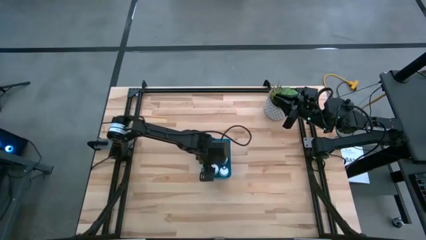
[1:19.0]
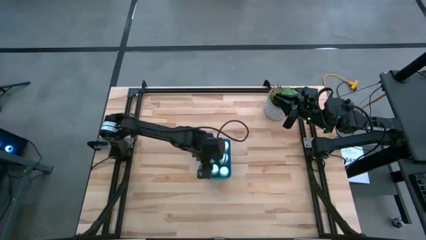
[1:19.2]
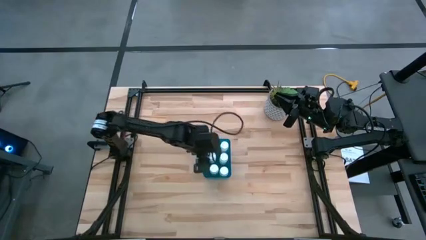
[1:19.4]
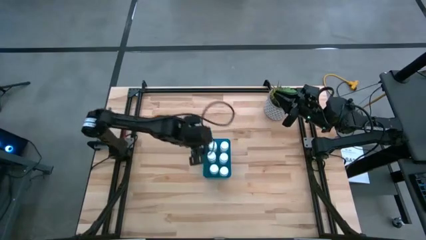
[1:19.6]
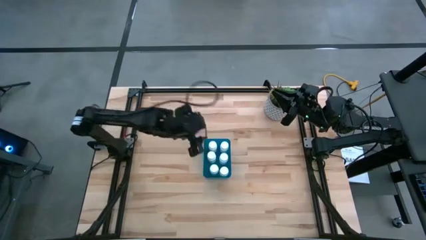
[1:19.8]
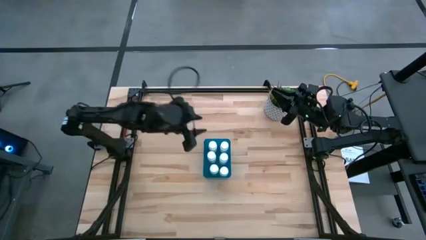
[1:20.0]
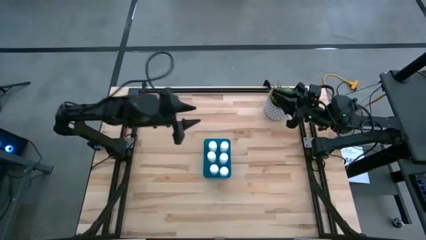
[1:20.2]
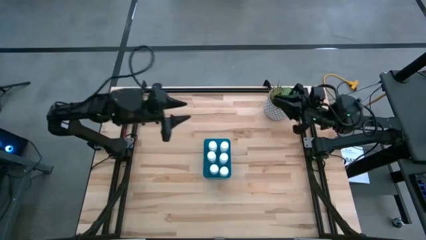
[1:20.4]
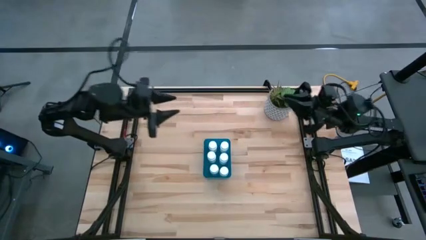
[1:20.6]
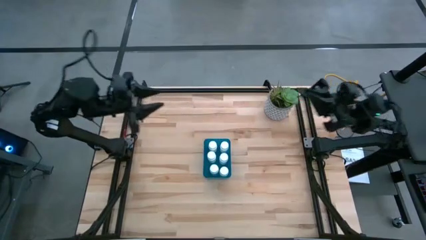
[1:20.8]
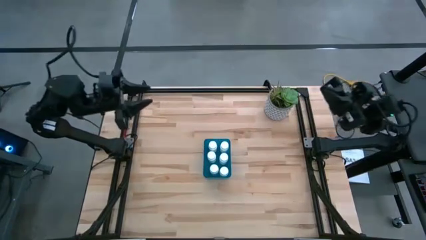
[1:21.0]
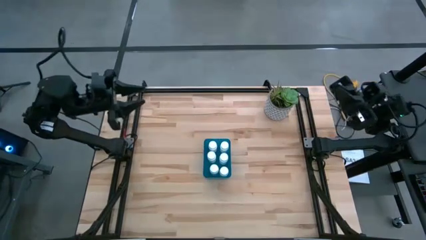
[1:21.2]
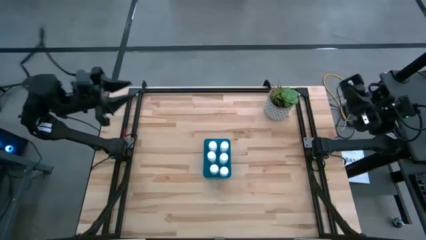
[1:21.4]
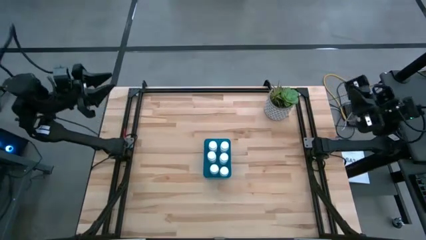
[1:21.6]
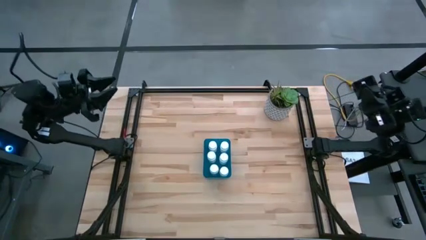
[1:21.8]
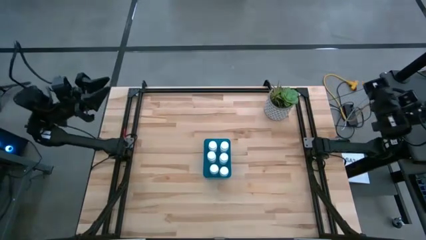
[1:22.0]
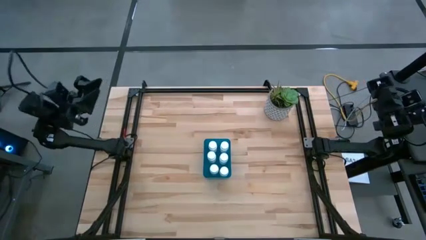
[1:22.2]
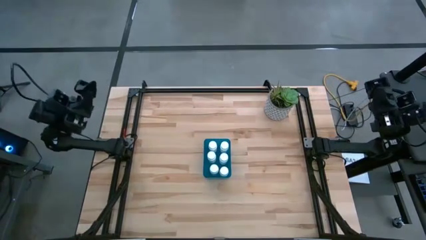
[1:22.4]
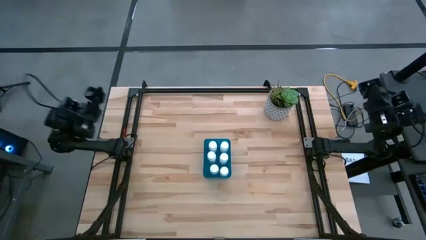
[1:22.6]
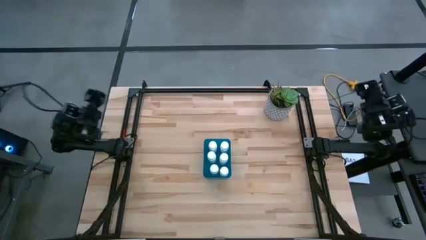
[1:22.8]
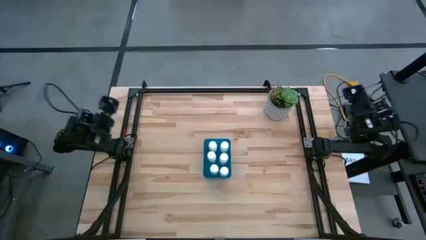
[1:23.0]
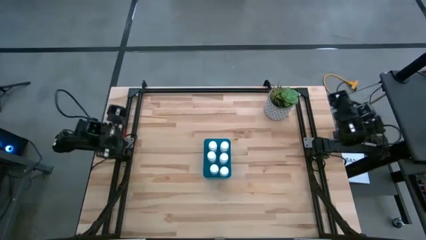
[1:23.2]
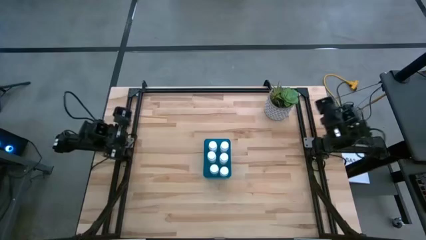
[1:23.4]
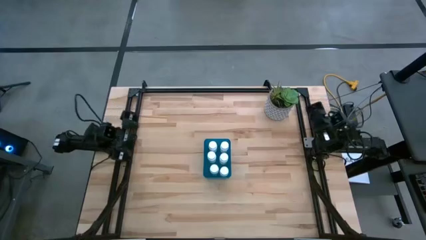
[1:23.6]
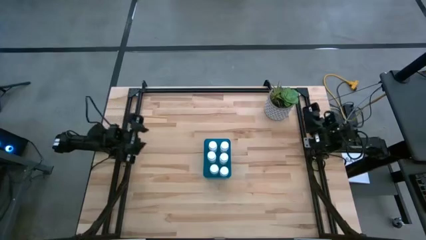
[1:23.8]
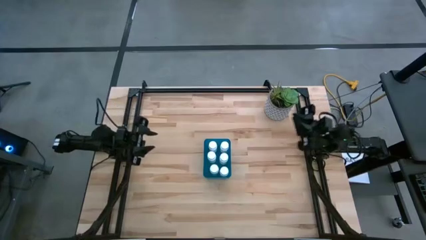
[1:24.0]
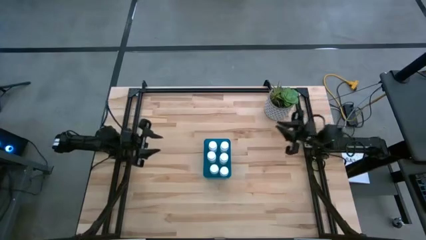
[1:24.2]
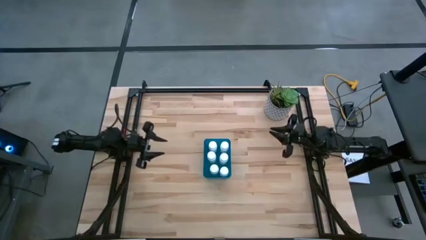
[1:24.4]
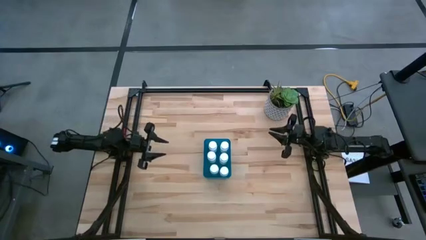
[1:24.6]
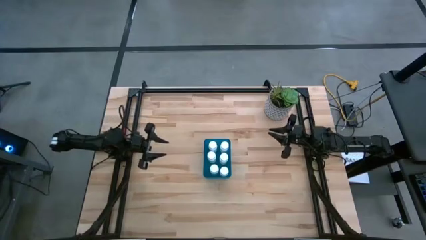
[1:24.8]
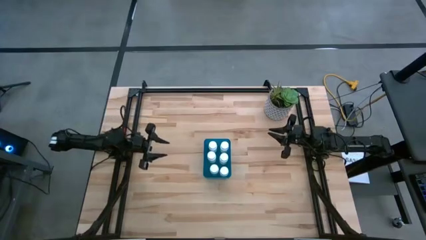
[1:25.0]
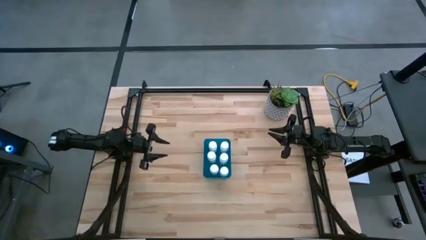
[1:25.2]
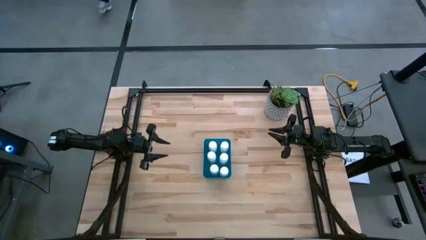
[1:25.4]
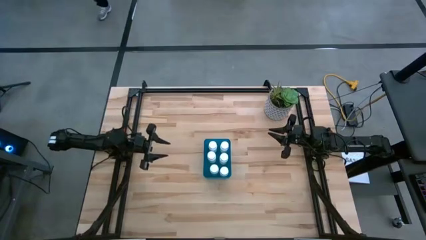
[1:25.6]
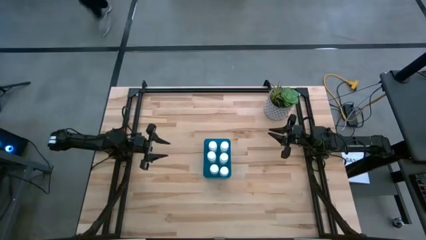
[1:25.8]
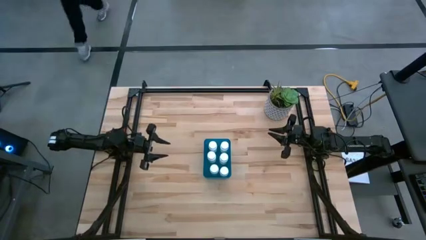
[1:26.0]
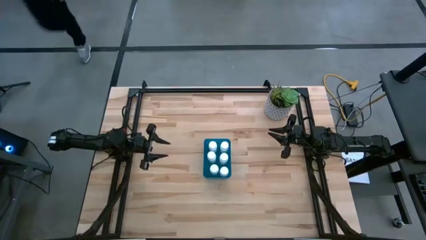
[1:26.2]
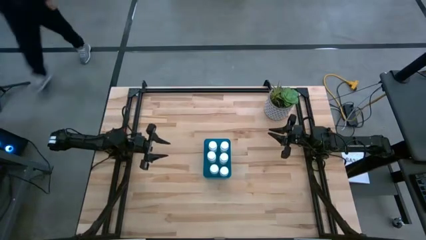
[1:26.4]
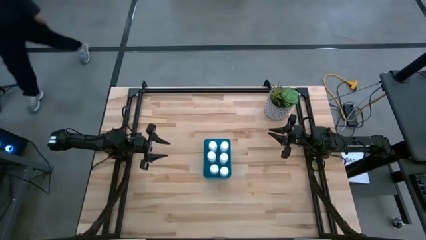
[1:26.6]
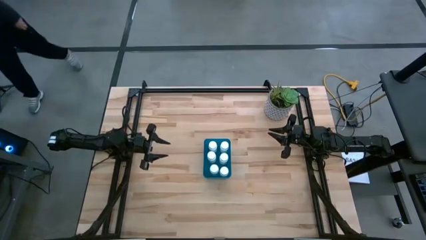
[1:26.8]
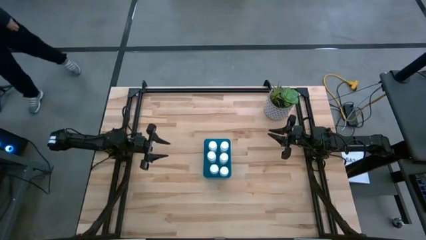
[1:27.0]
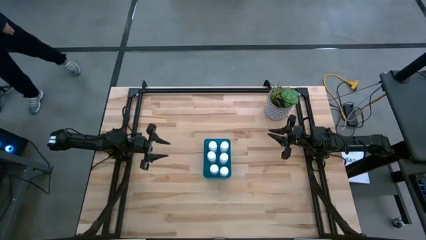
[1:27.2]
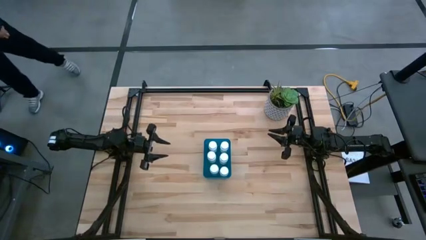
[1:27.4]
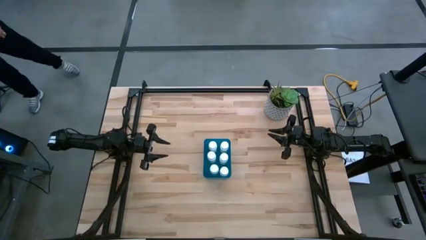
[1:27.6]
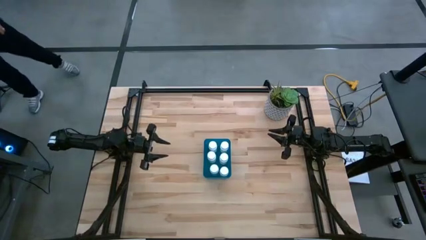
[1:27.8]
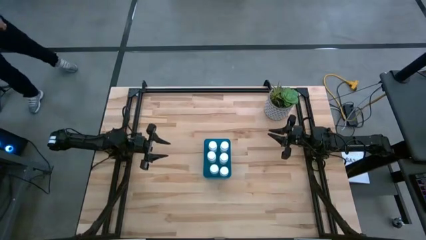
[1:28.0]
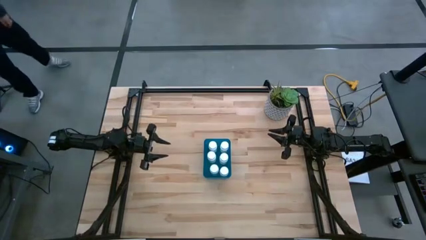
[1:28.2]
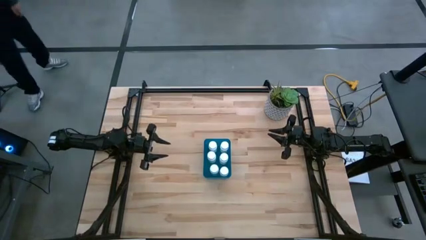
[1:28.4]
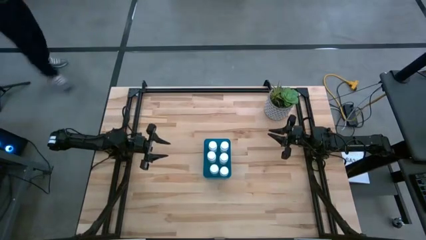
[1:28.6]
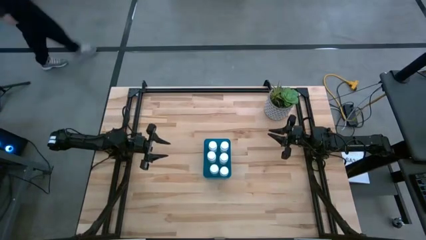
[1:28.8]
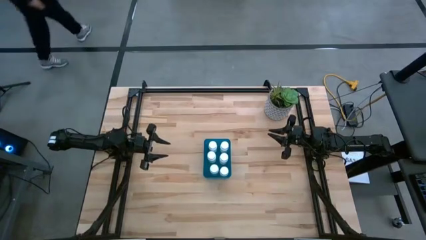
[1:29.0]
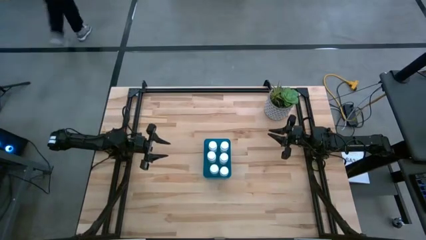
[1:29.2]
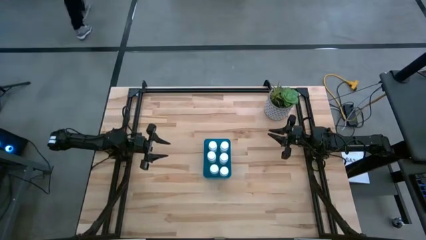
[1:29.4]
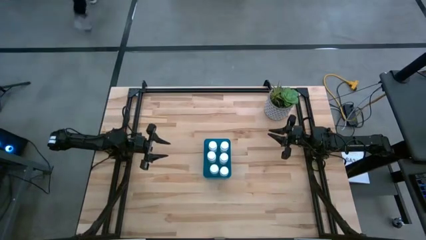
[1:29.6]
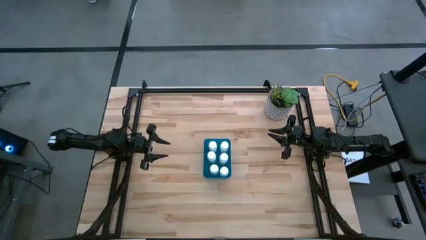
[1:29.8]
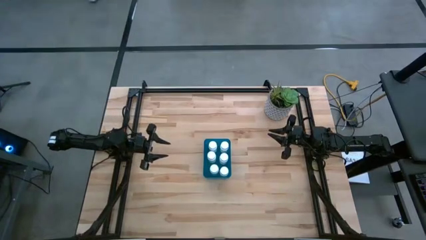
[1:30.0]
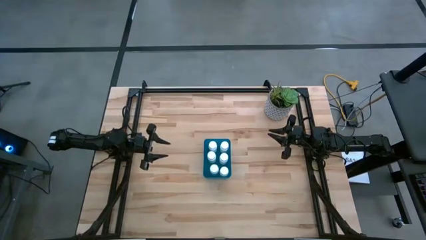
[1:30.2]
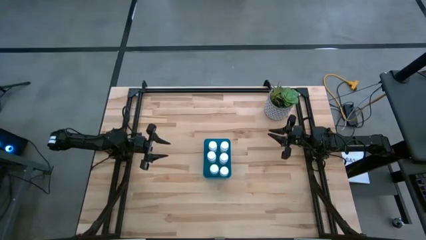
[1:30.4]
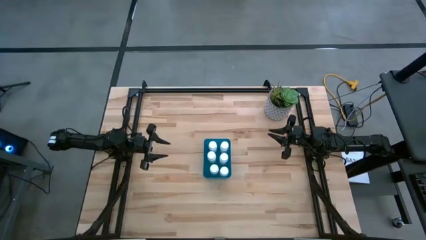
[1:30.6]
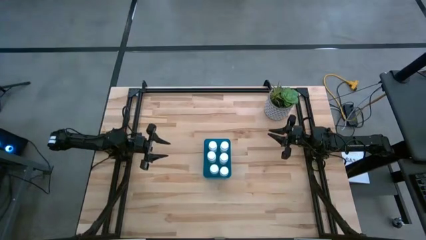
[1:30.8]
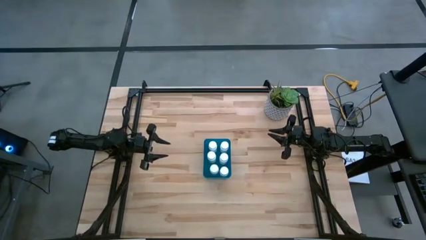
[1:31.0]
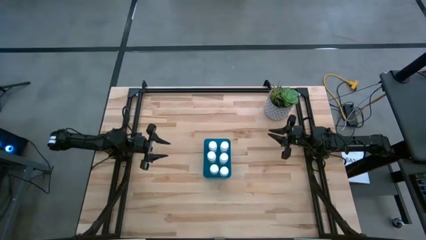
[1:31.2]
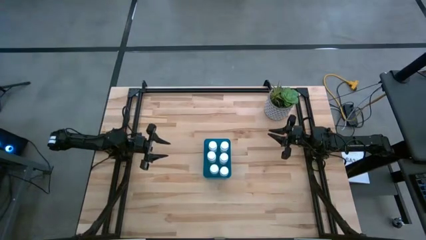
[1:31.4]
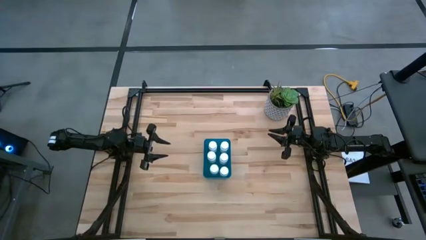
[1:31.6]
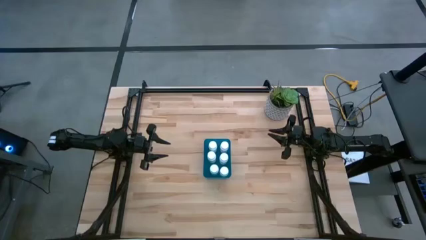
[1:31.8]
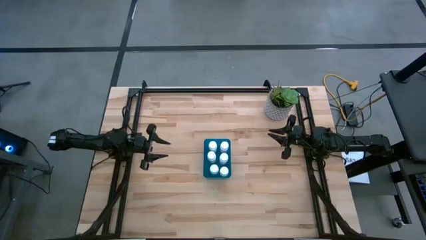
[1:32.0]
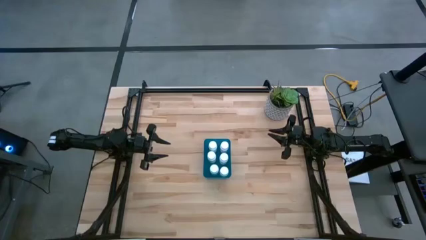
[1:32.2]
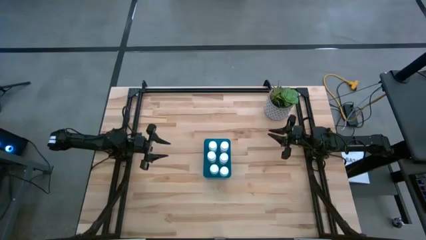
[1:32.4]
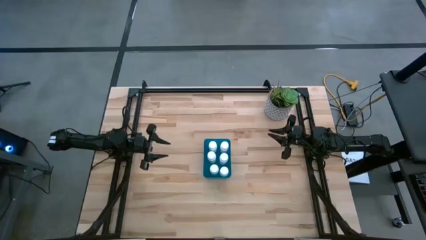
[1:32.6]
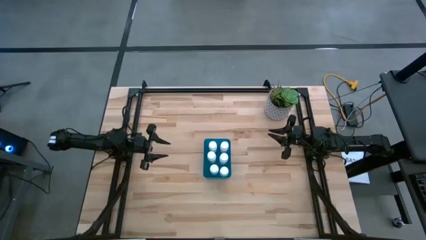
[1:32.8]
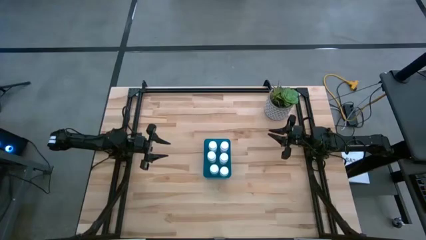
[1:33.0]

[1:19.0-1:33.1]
Task: Pick and place pill bottles into a basket
Return to Home Position
